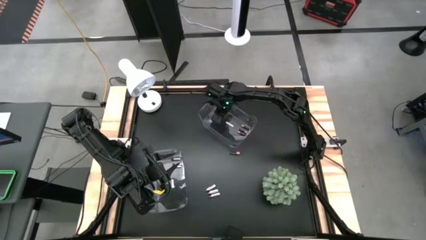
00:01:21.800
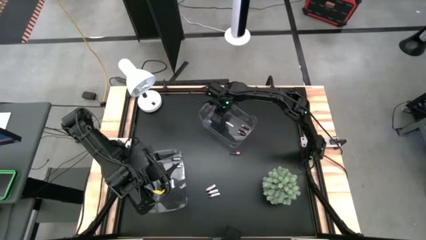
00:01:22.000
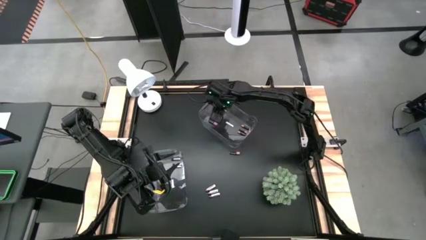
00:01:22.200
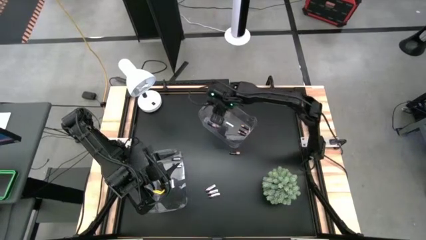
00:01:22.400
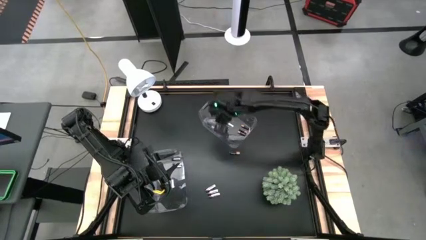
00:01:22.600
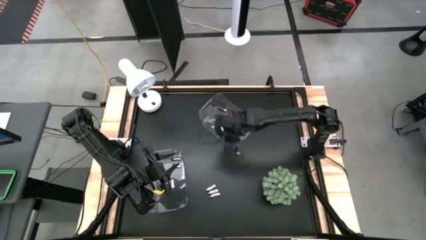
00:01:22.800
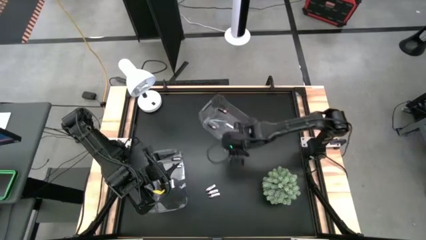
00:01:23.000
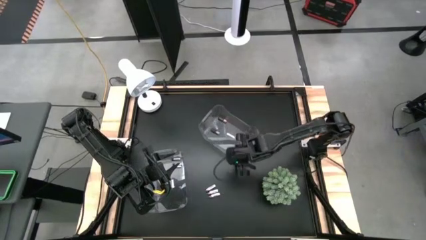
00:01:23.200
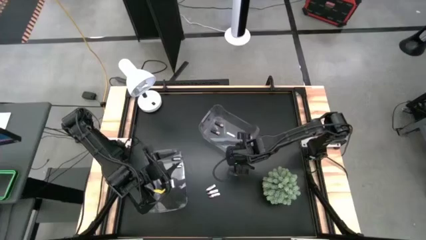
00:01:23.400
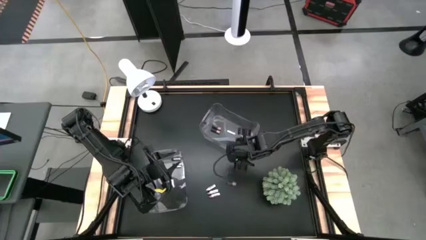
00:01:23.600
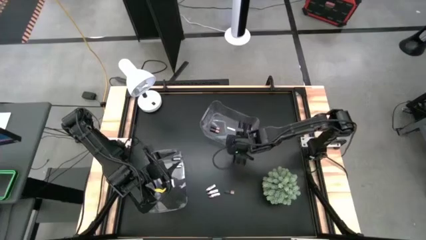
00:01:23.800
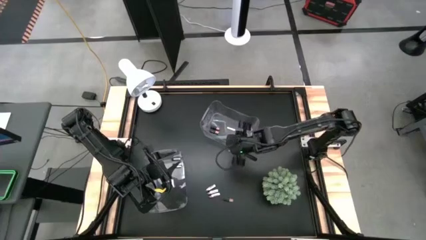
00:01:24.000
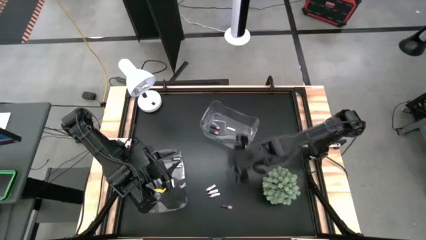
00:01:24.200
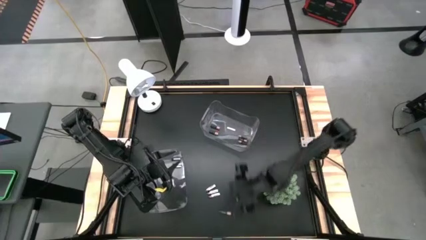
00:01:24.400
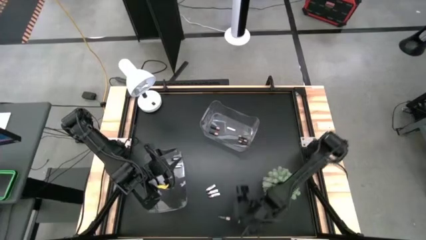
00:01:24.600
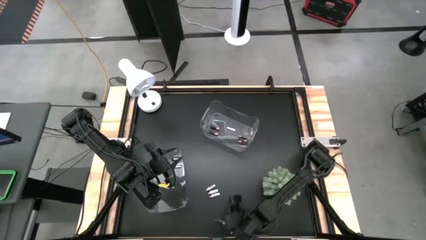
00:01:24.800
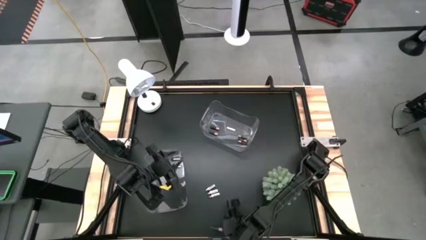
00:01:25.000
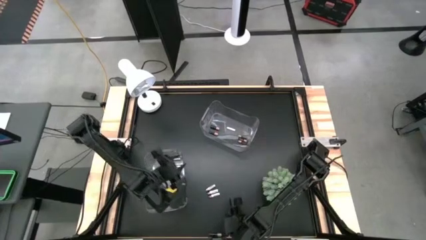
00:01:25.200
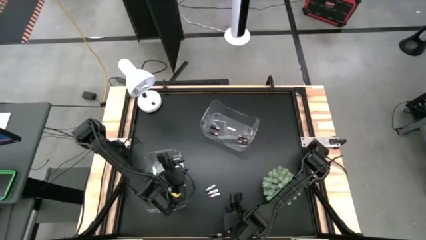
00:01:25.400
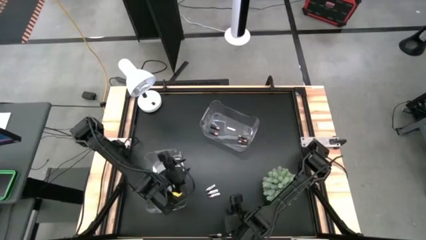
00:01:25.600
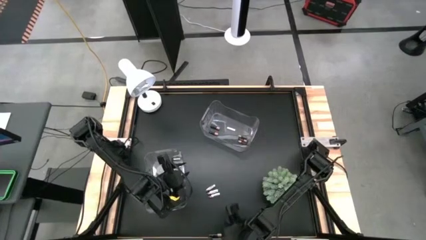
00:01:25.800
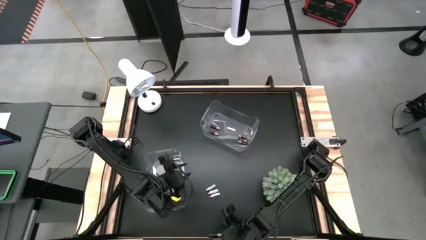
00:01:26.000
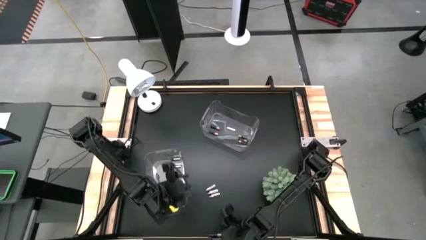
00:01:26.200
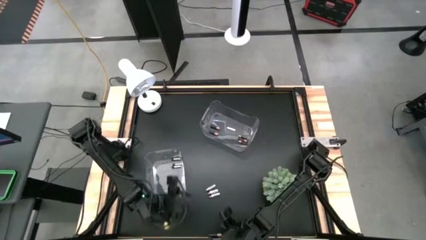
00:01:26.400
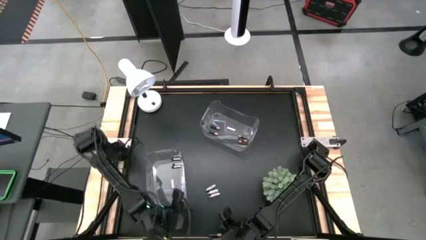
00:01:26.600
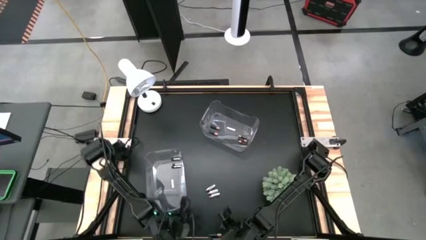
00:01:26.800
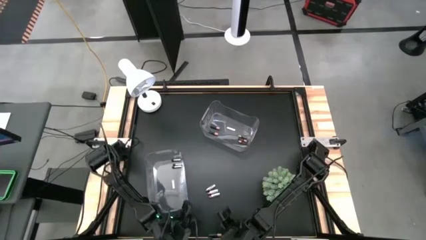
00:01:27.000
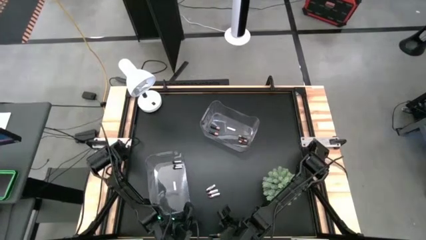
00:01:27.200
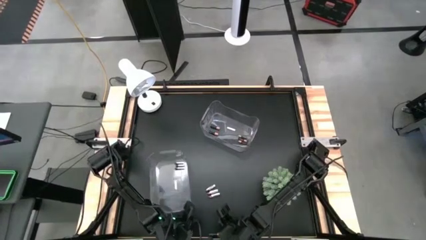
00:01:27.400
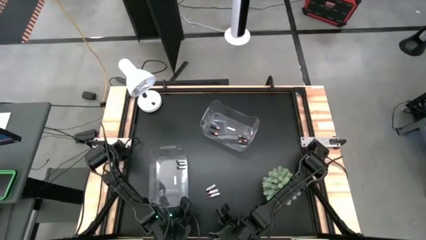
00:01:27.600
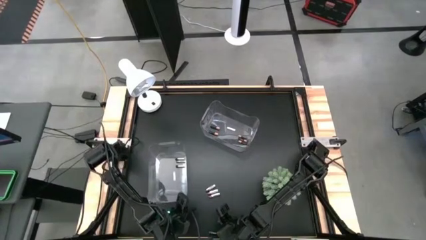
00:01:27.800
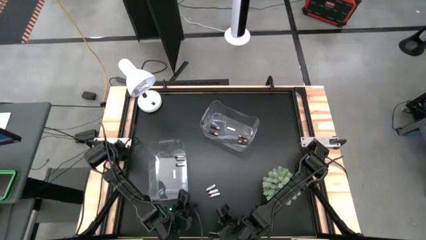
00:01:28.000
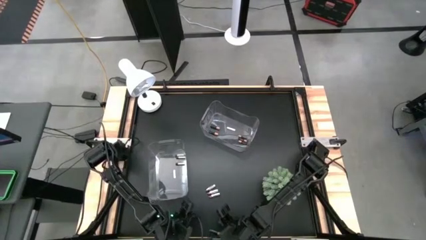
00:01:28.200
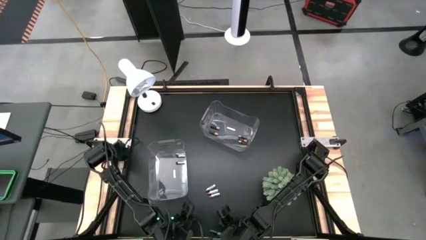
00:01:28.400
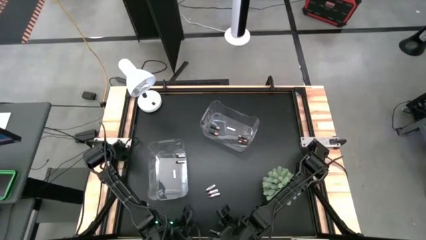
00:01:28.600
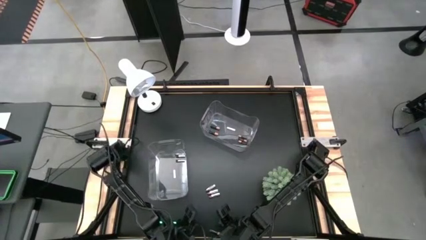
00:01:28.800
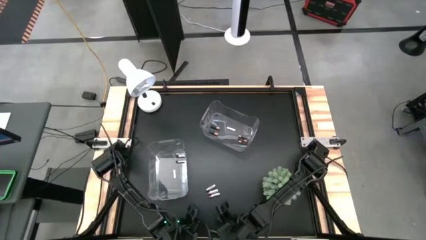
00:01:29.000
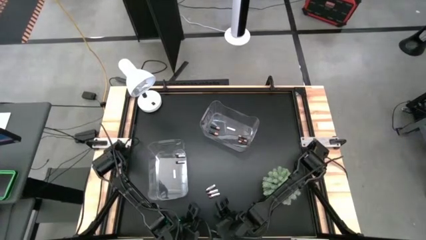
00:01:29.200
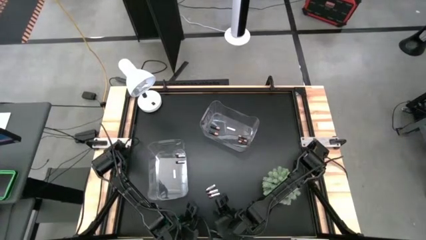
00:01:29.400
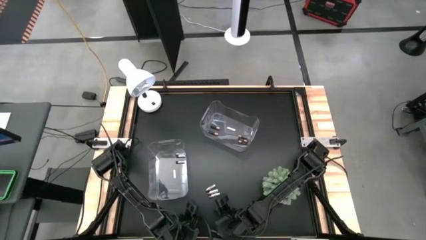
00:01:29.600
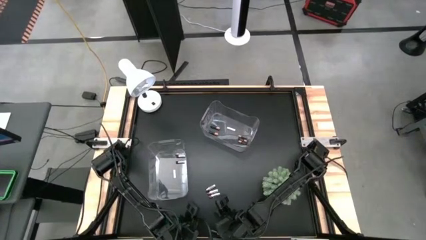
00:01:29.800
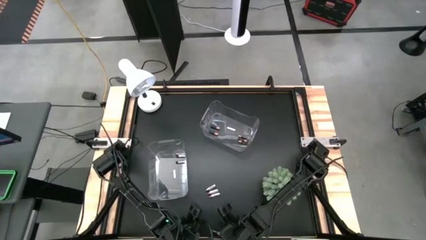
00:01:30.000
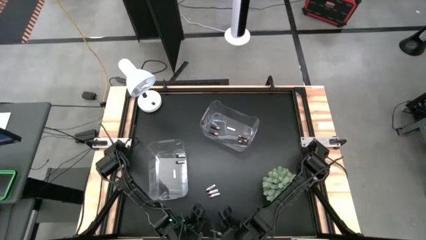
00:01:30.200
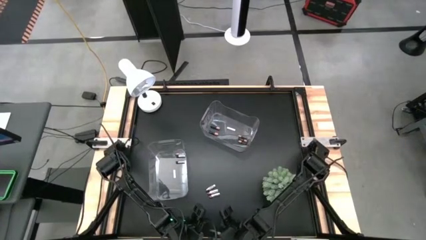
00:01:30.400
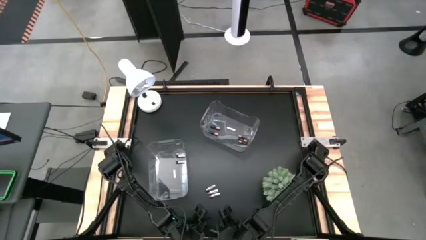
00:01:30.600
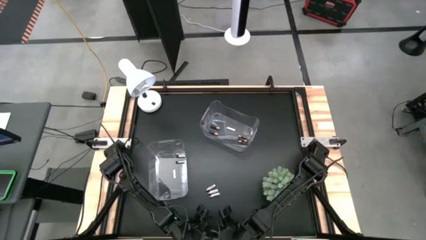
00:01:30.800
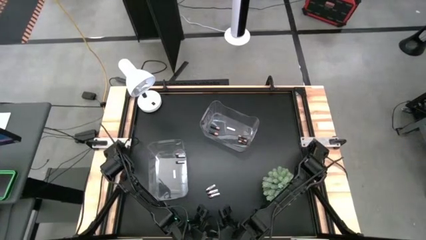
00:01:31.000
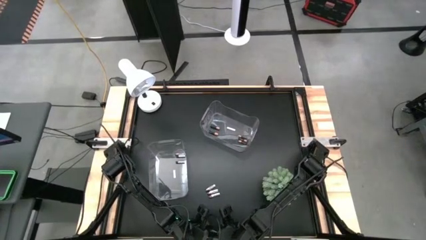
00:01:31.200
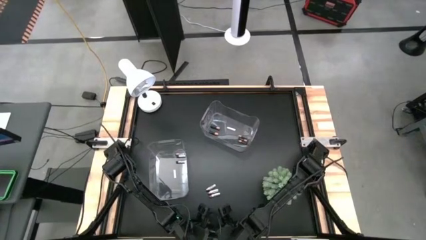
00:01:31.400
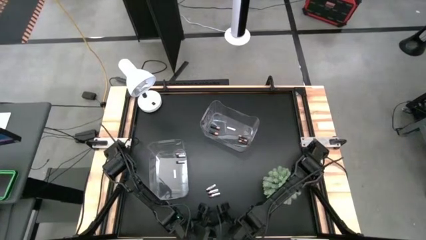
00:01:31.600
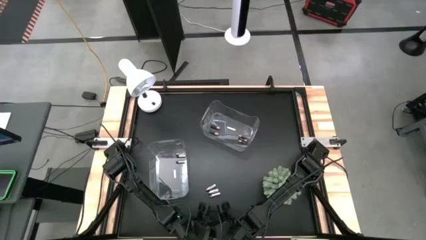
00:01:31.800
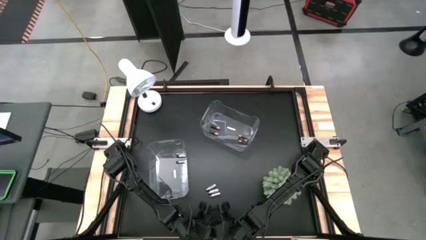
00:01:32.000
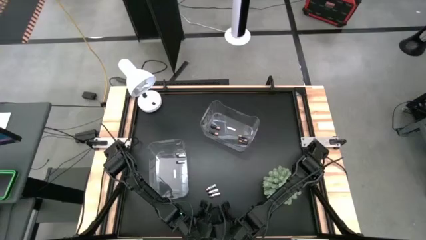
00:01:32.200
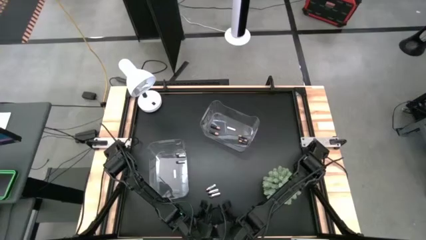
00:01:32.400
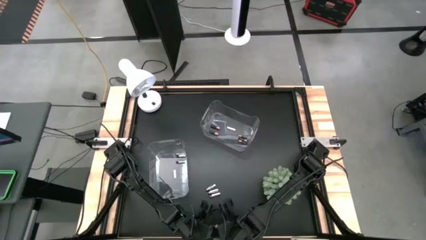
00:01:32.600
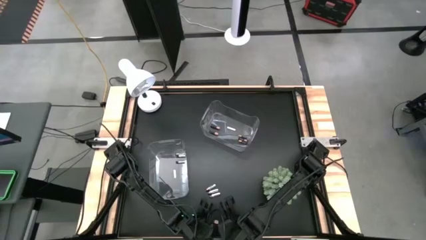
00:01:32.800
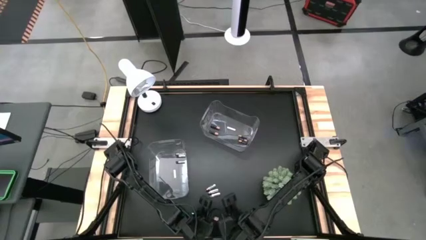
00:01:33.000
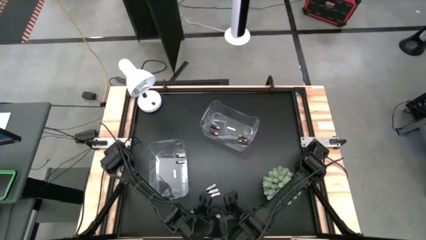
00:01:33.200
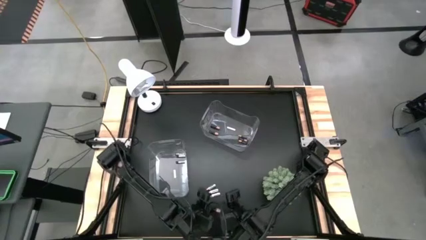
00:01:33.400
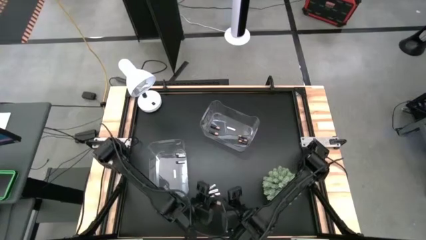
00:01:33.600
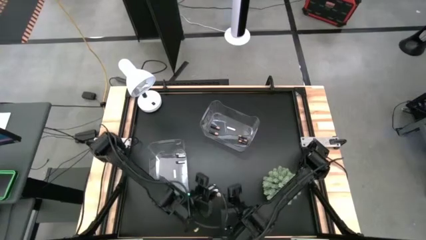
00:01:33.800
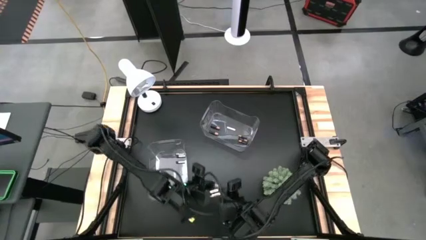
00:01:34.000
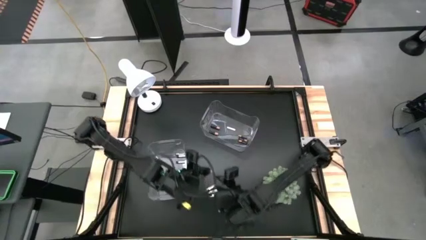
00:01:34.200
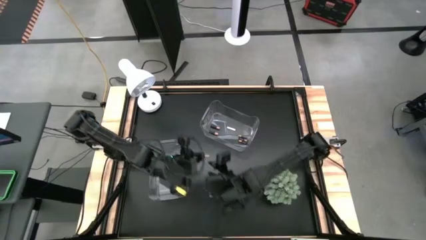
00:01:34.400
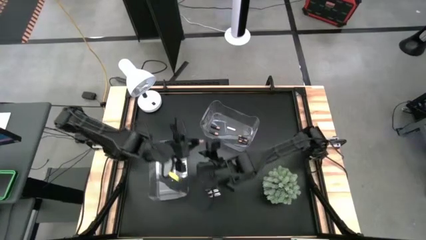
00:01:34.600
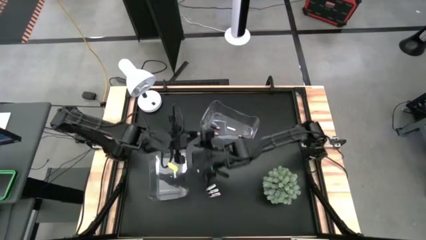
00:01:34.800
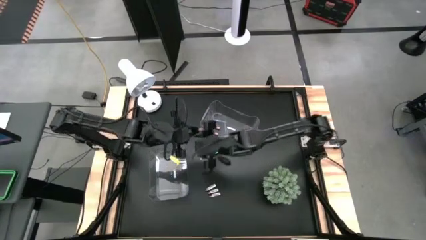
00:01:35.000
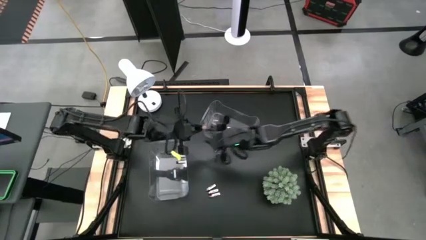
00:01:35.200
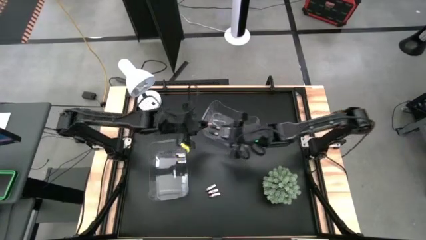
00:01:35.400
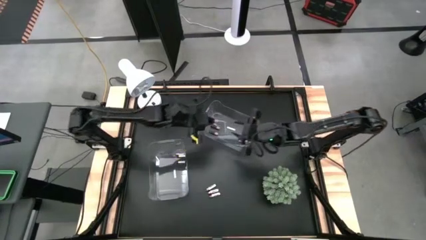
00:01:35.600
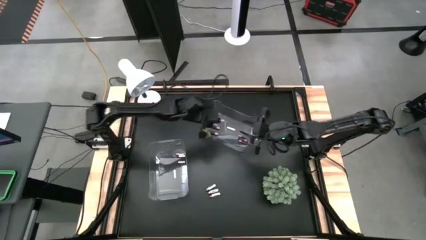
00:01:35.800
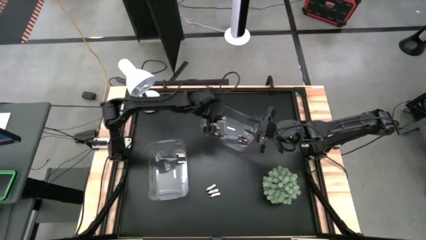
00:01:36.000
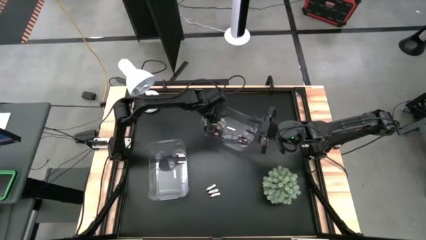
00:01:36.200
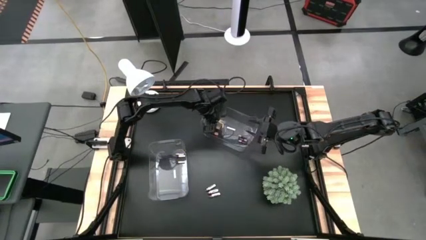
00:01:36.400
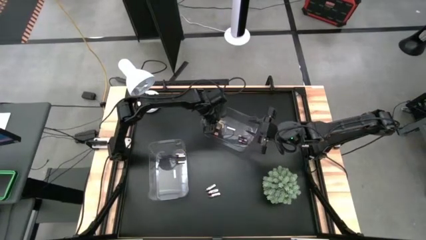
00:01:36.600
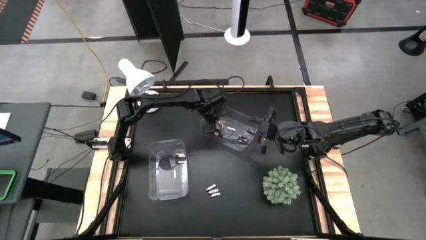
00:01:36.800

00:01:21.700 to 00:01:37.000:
Task: Sort batteries
Put the black battery into the top transparent bin

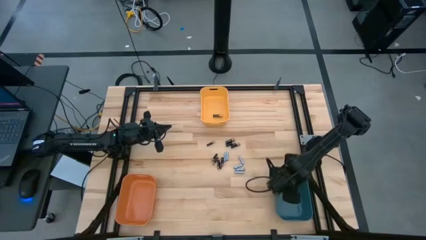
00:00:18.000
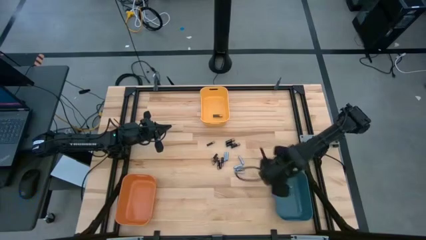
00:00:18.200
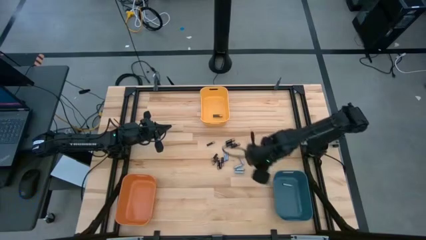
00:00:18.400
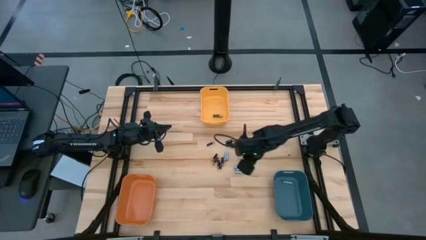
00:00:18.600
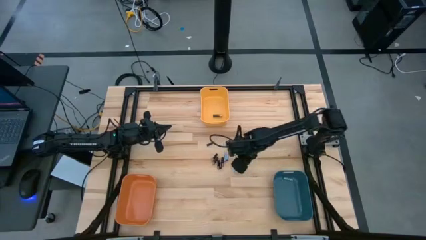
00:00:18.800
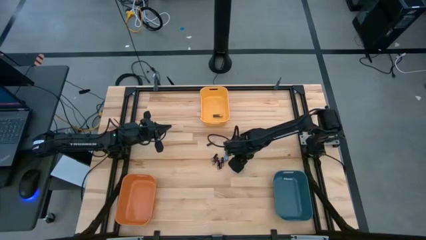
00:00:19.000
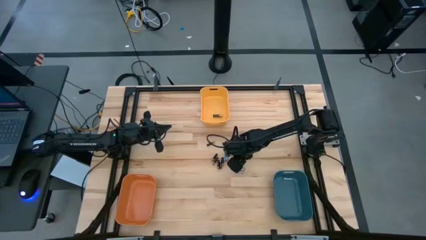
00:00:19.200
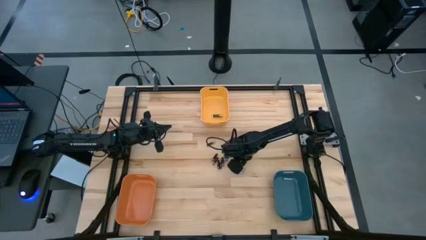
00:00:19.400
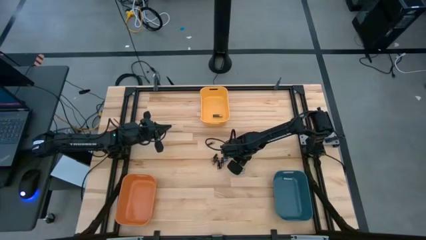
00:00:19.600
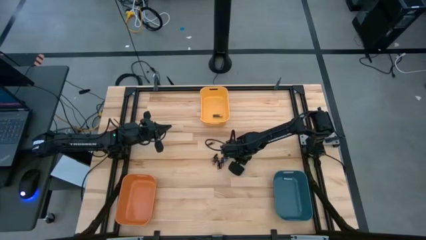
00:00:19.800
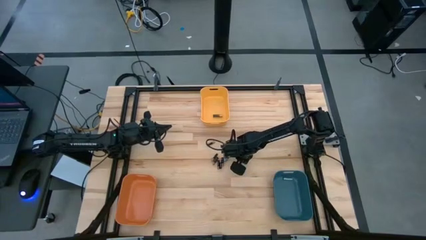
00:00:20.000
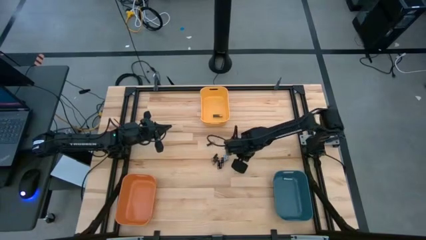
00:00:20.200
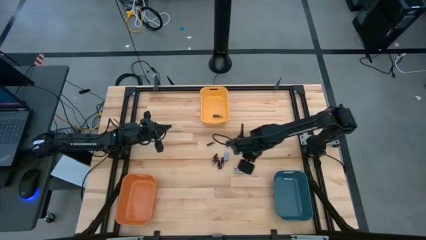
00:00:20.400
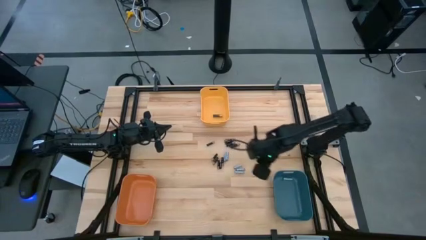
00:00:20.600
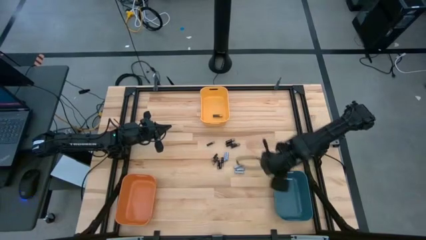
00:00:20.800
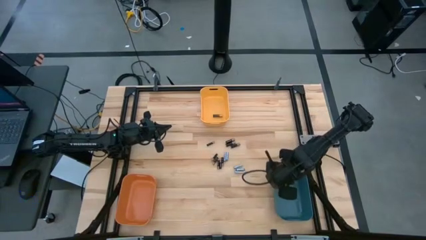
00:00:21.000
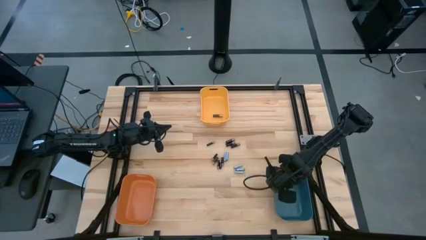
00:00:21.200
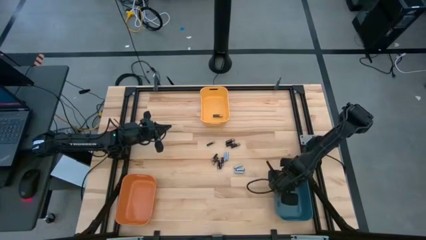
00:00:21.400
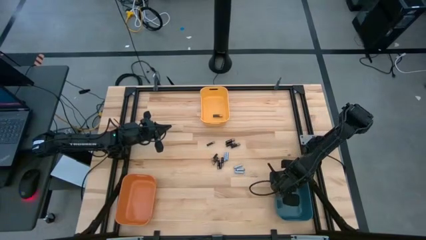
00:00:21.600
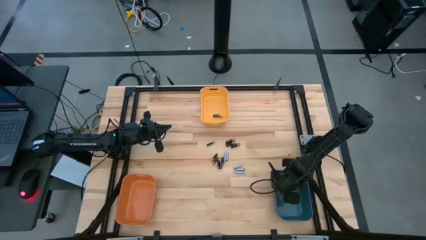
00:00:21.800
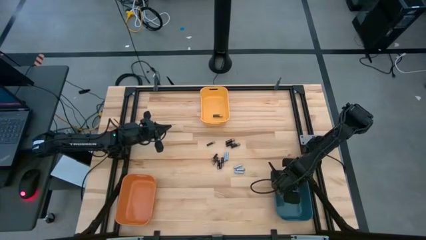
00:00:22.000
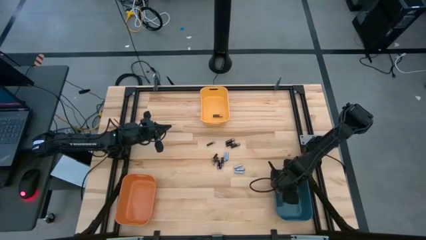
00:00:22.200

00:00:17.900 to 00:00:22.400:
Task: Sort batteries
Put the white battery into the blue bin
